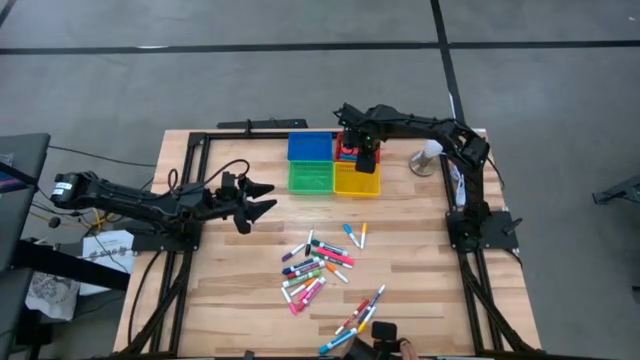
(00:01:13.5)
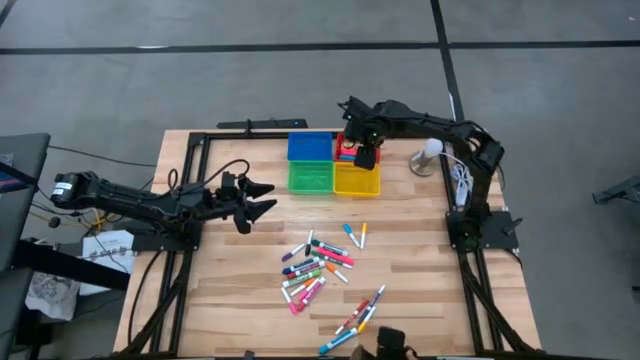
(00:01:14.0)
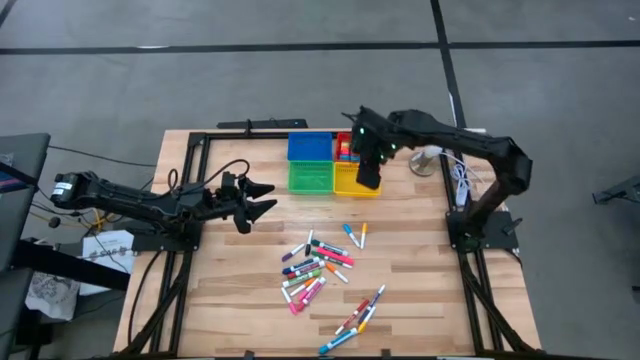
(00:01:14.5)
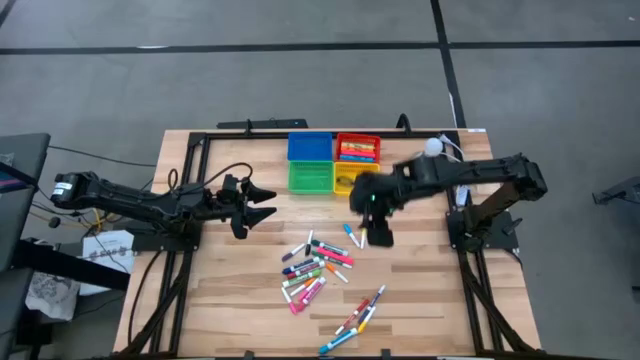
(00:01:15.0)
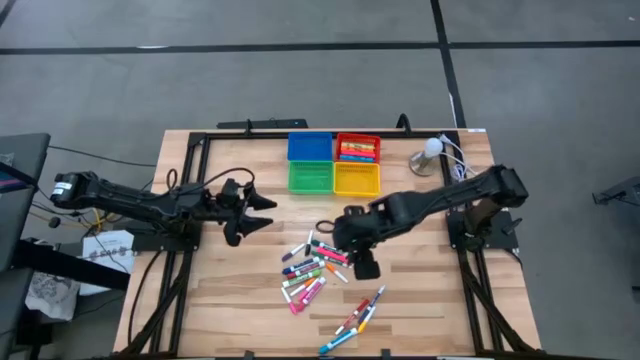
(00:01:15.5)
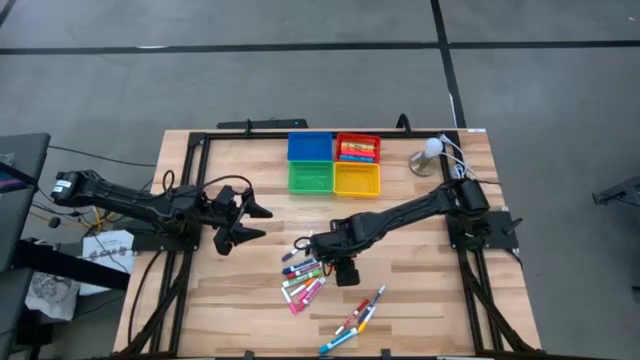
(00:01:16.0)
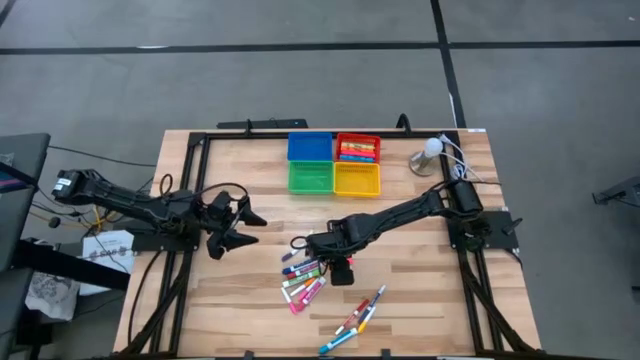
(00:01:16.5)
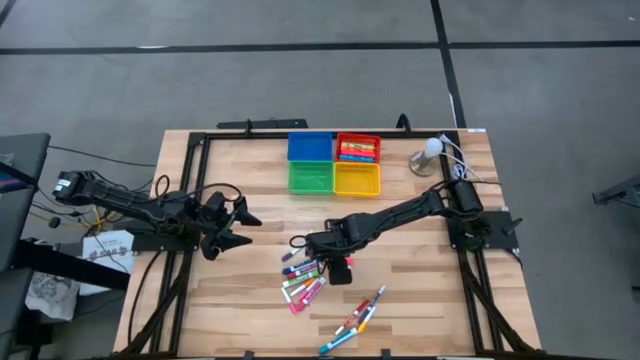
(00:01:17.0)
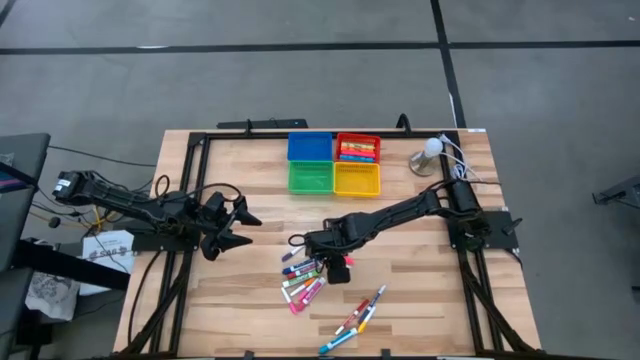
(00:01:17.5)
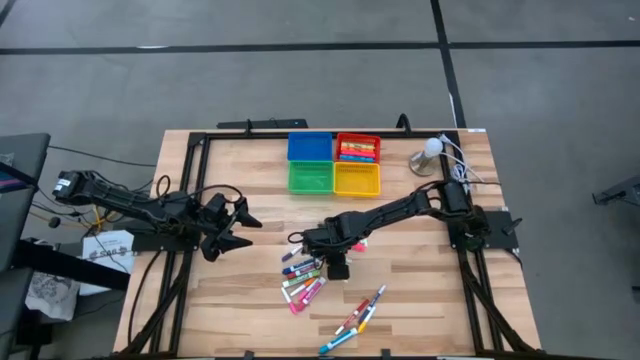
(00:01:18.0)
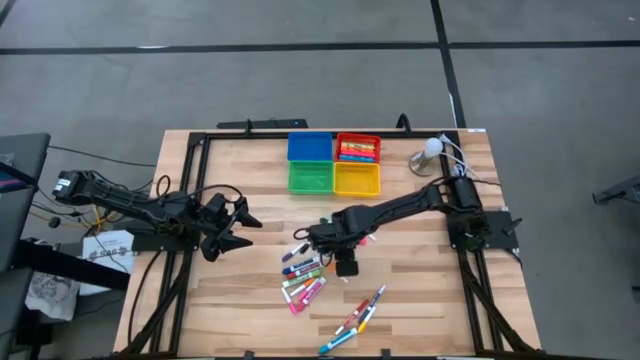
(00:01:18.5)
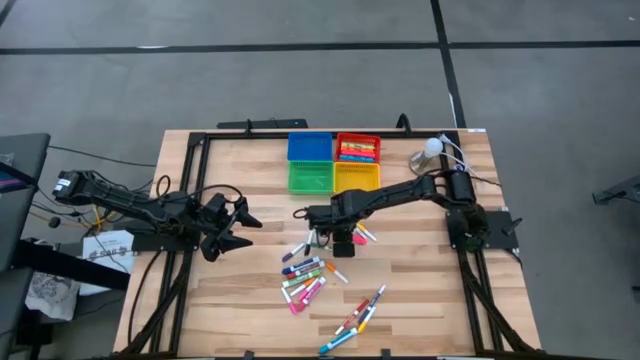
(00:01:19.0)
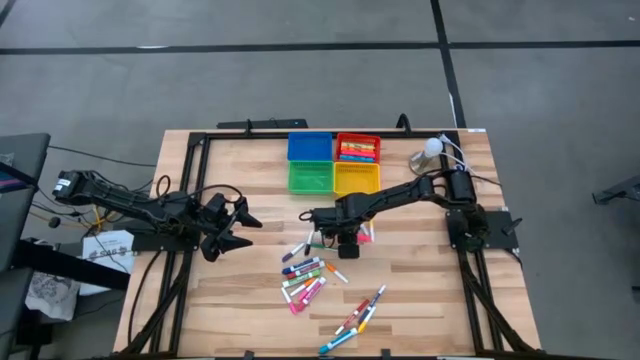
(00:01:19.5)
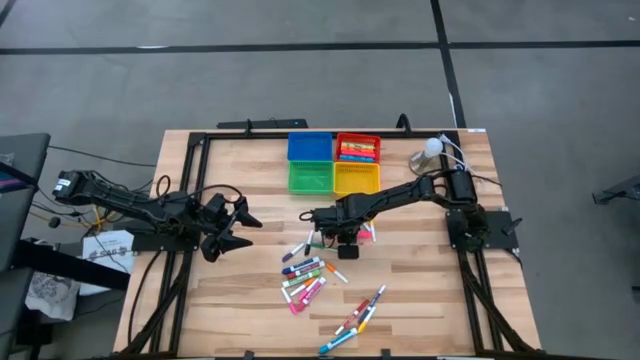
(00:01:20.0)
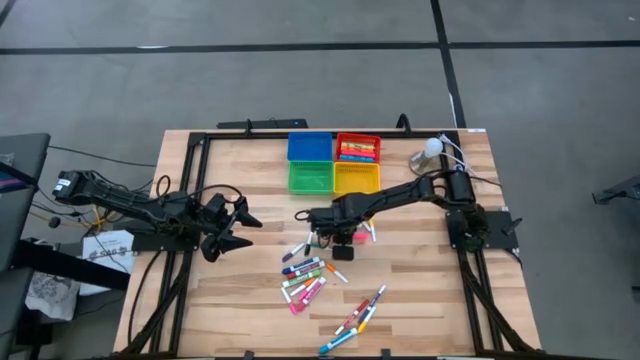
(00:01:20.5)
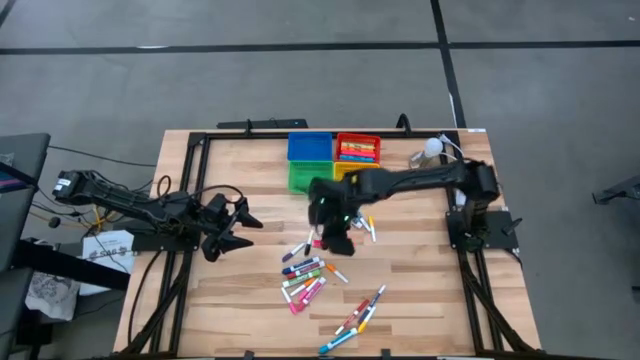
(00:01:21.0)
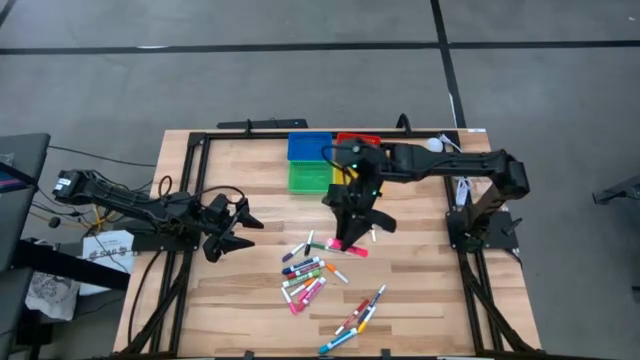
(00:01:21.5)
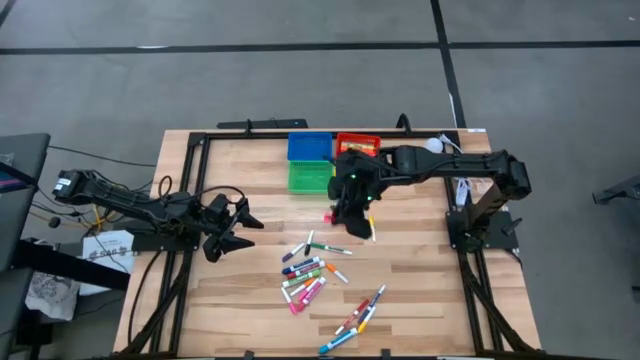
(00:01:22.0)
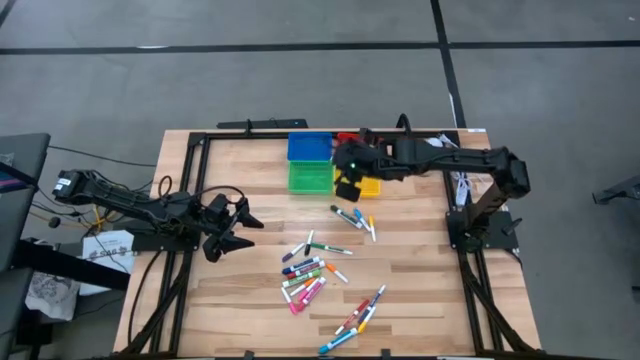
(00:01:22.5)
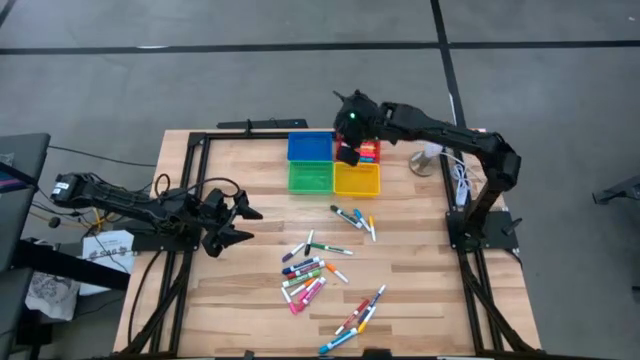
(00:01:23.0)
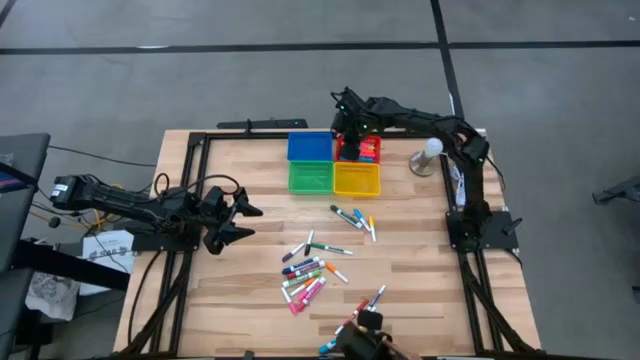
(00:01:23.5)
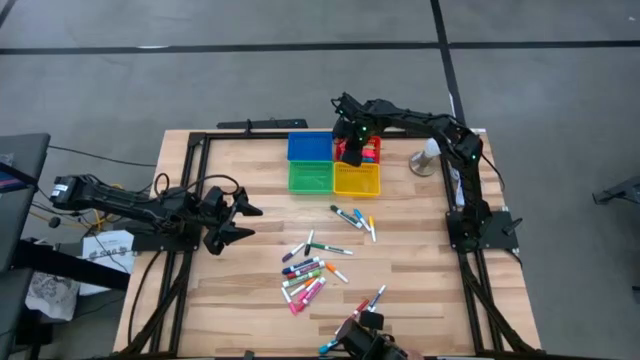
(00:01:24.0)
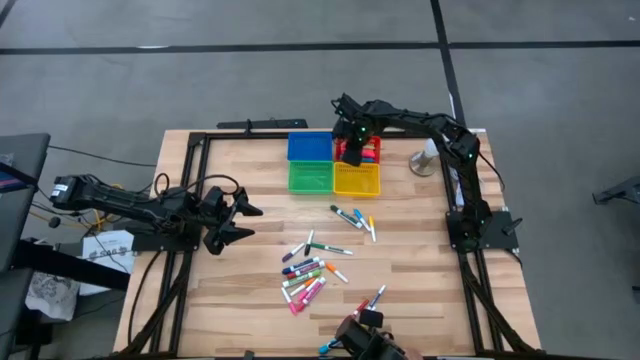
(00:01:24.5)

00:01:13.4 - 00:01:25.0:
Task: Pick & Place Markers
Put the pink marker in the red bin
